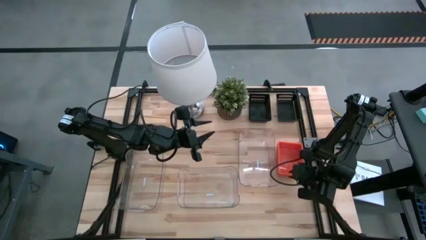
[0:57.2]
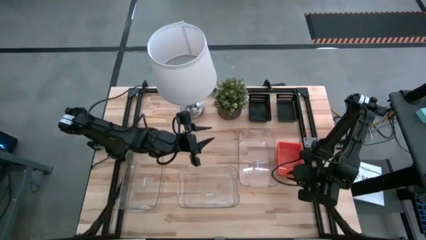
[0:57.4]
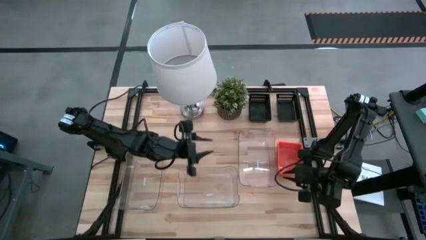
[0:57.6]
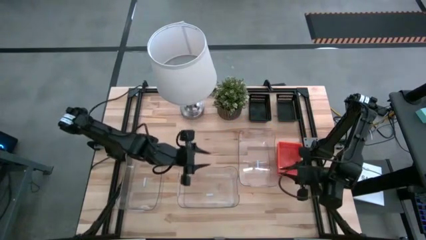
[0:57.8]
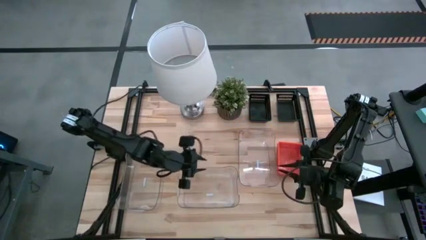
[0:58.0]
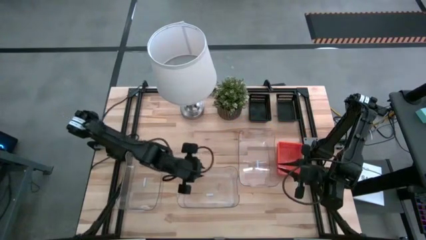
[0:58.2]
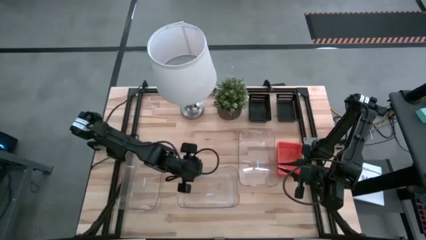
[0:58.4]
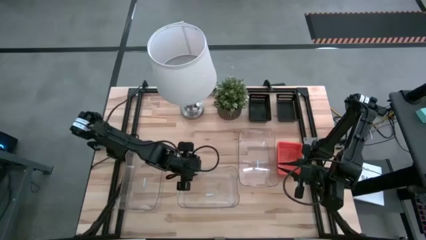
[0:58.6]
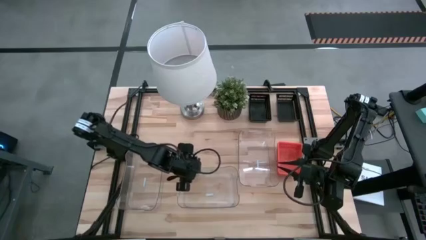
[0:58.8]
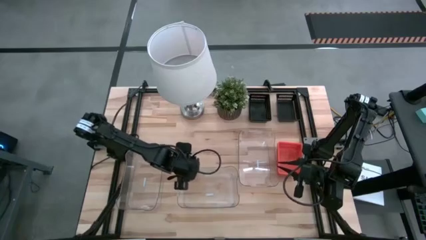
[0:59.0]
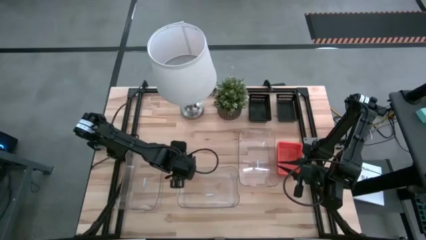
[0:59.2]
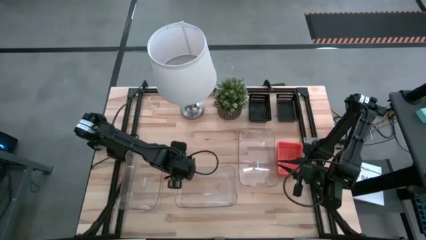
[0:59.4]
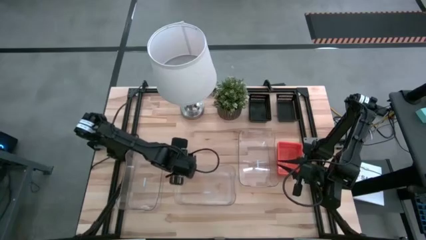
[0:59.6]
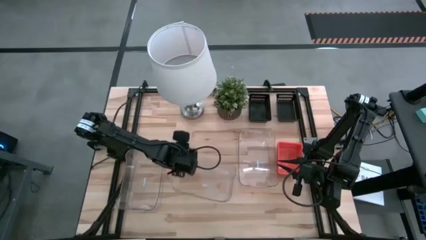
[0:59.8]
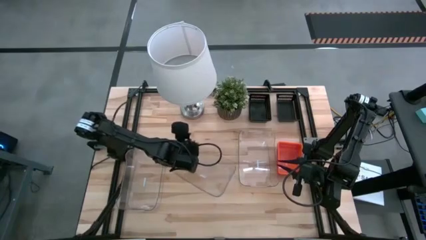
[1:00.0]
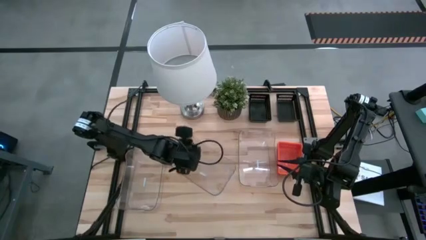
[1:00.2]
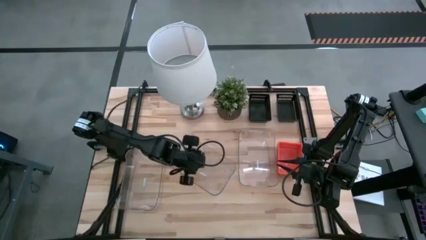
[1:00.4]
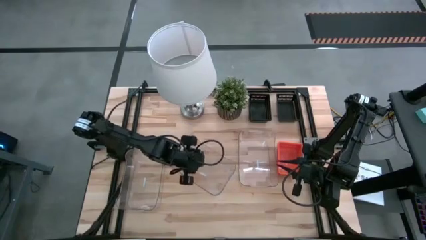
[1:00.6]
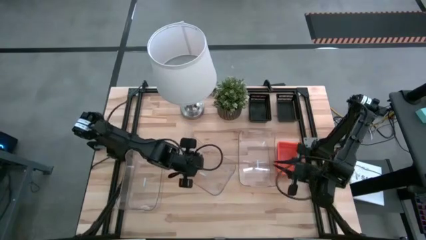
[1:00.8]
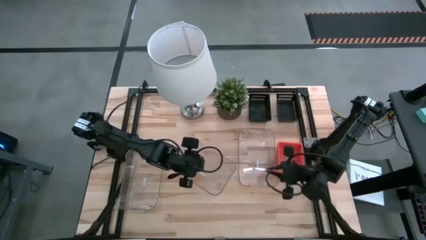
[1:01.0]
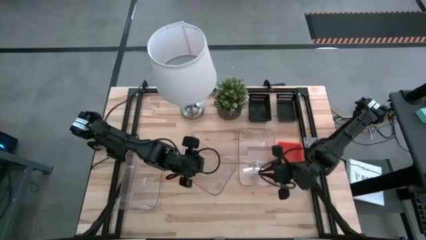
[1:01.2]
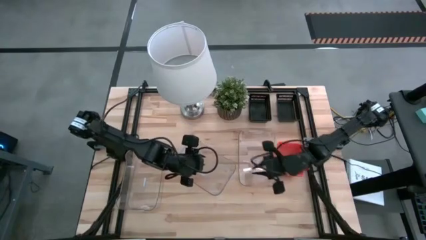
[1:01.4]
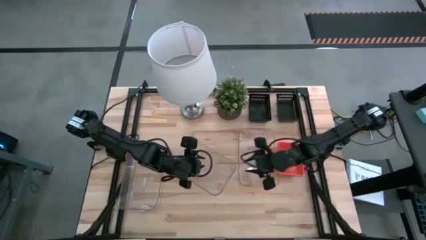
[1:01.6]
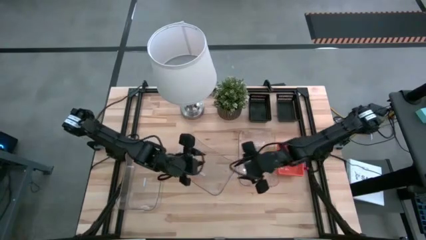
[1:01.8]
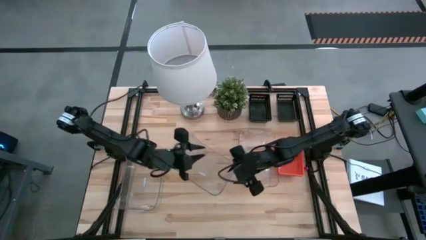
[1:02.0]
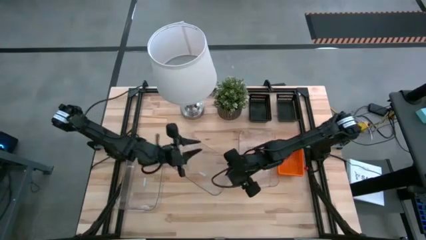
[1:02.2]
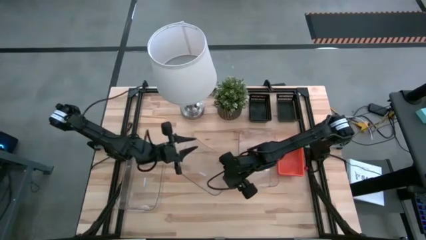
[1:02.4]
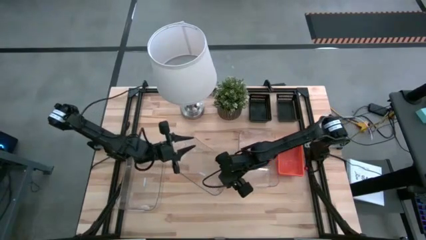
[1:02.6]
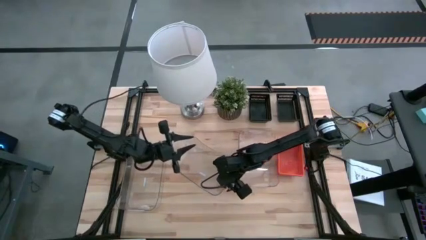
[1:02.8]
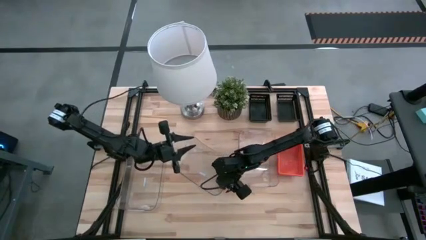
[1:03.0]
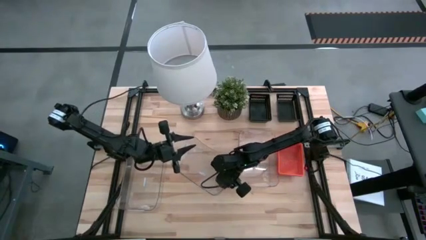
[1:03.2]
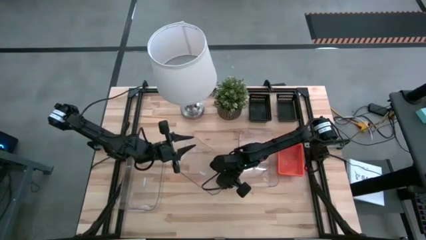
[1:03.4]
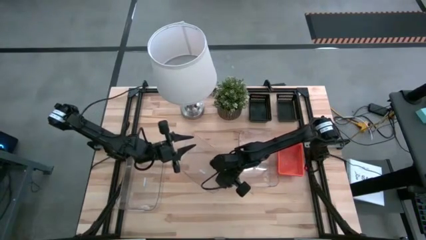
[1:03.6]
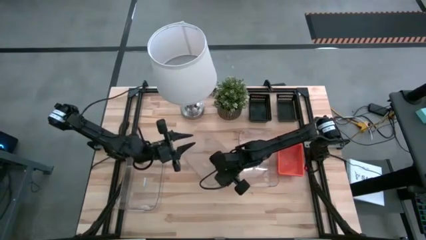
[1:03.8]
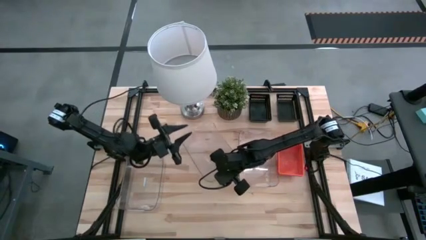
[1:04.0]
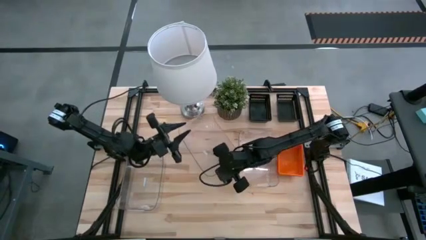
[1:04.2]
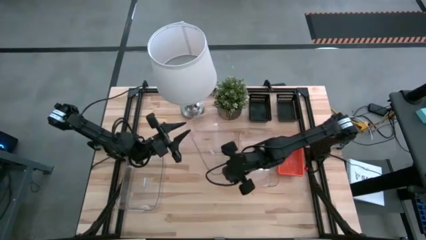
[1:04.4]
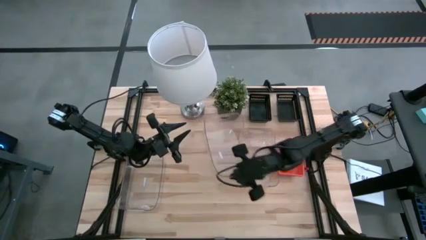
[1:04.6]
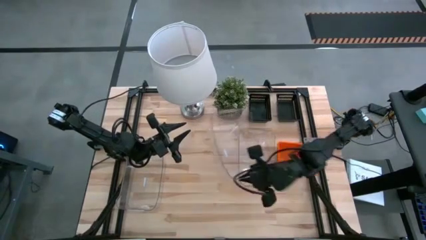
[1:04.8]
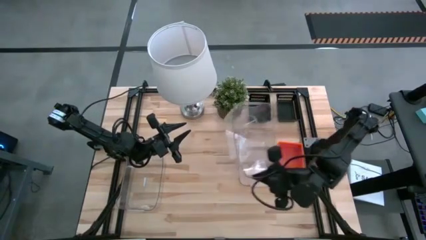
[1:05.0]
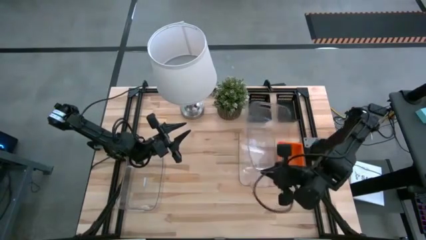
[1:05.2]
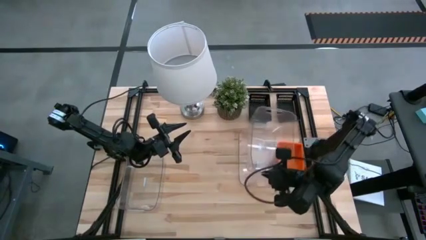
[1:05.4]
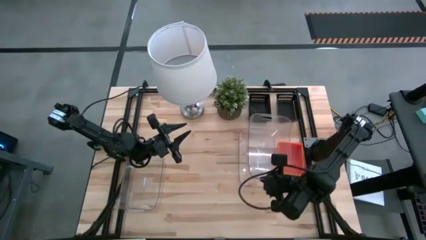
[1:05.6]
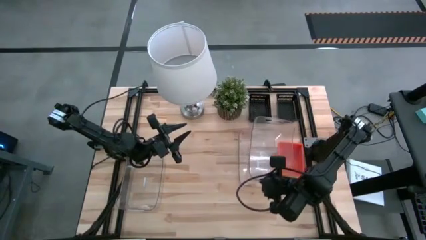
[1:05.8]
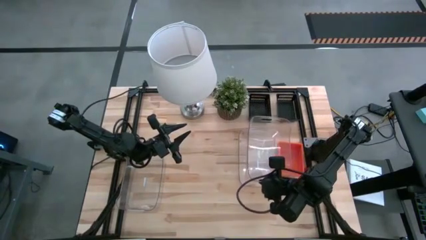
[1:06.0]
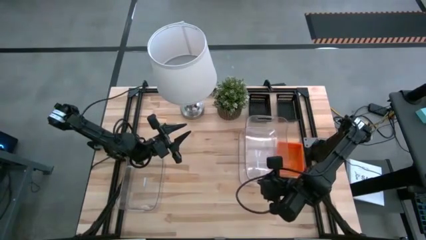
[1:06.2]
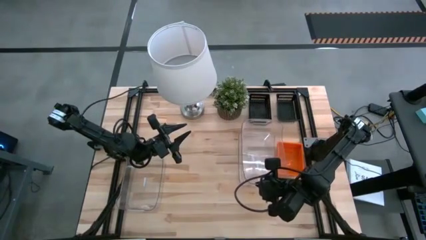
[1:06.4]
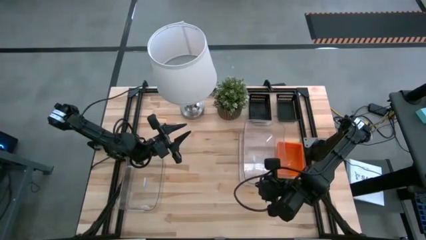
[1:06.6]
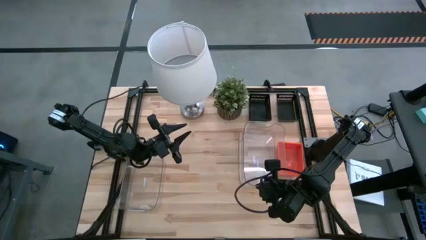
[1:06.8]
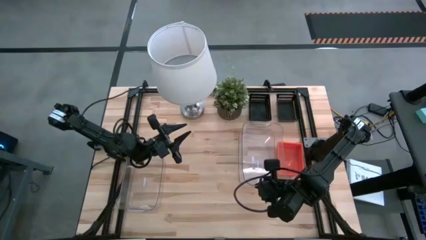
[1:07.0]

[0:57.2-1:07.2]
Stack the middle transparent bin on the right transparent bin
